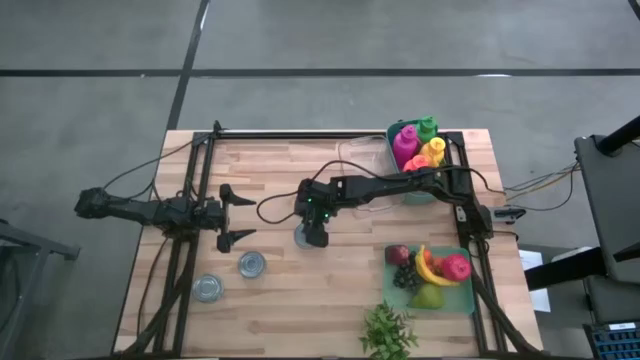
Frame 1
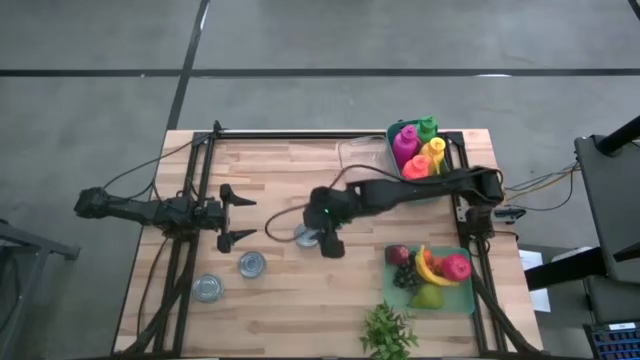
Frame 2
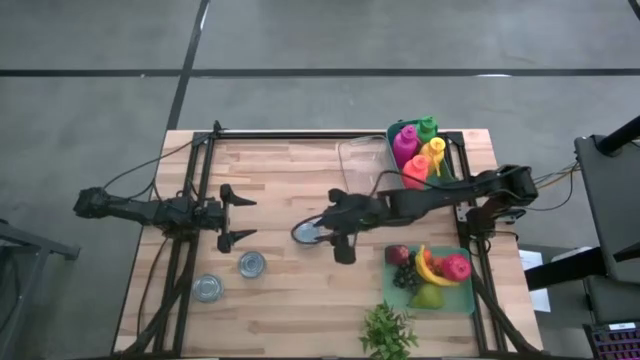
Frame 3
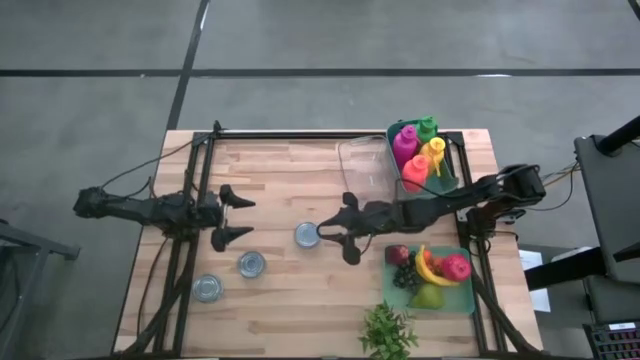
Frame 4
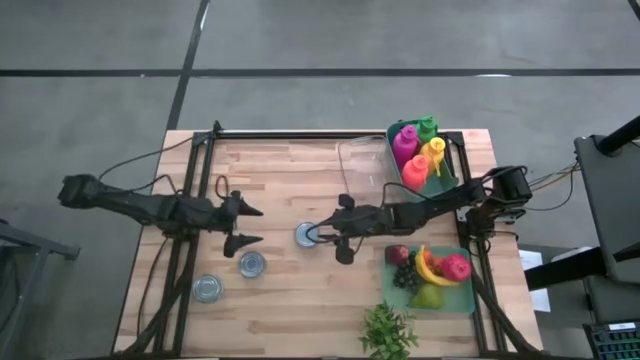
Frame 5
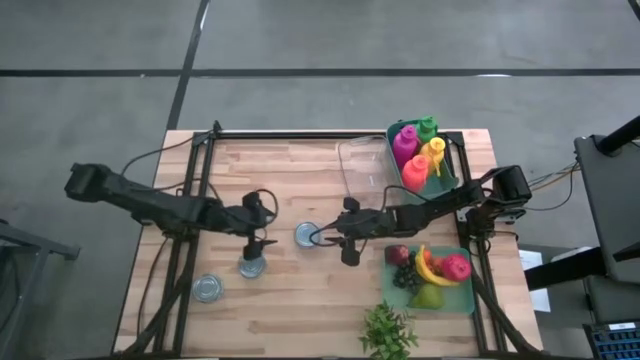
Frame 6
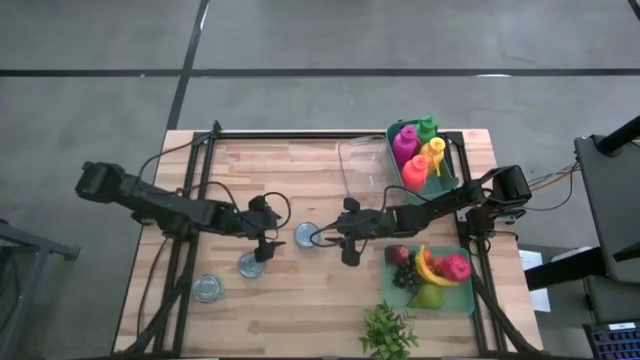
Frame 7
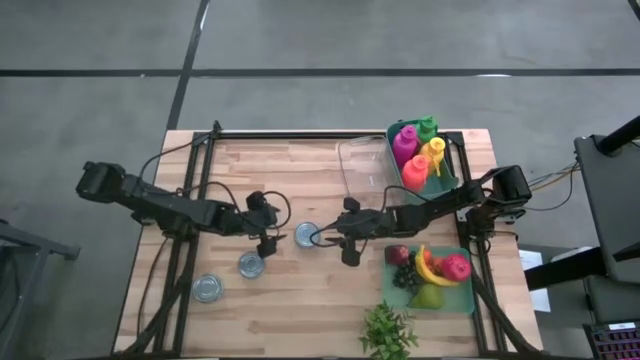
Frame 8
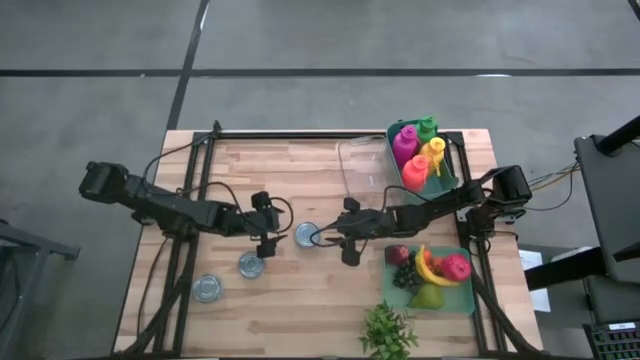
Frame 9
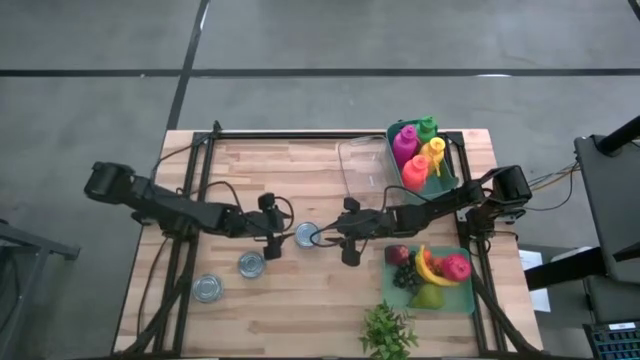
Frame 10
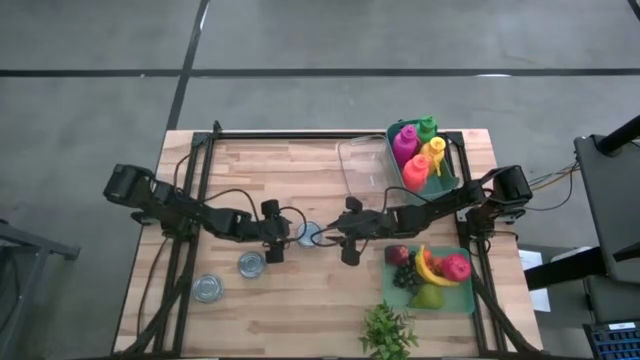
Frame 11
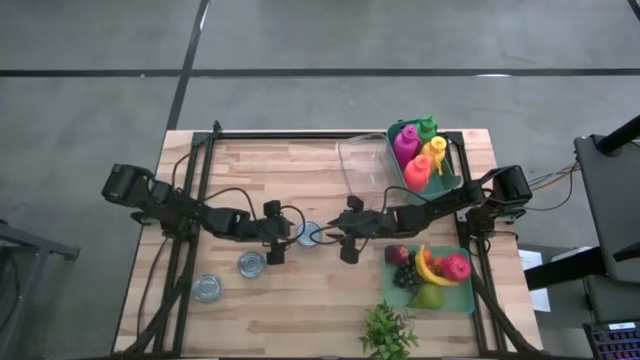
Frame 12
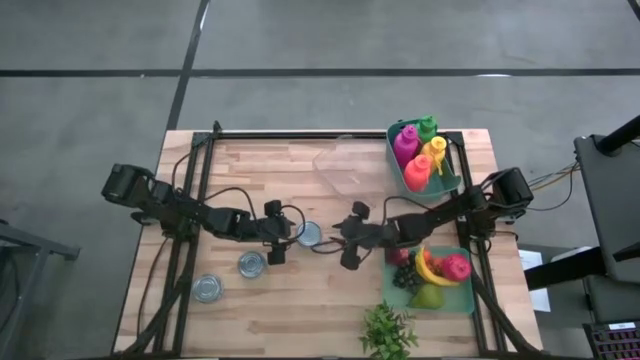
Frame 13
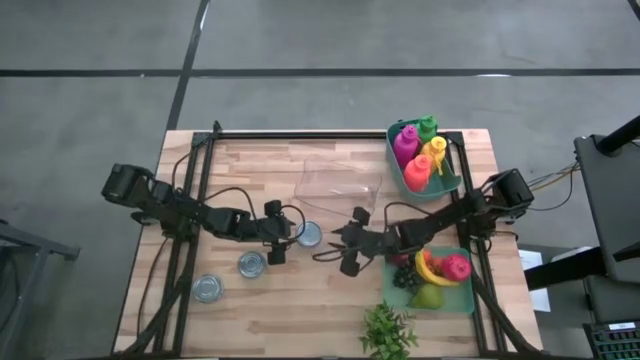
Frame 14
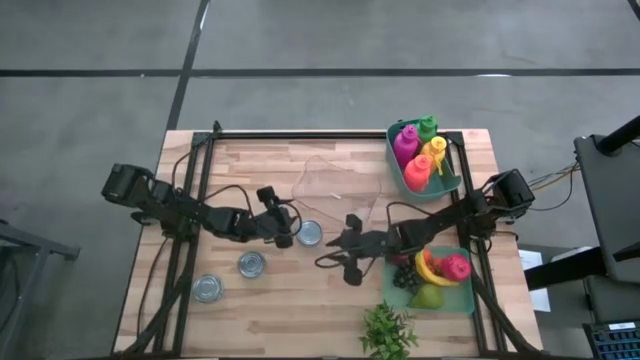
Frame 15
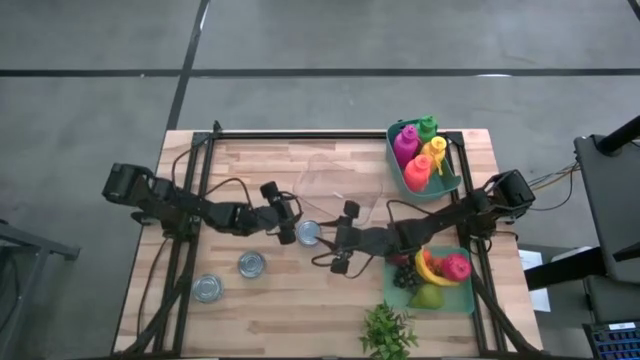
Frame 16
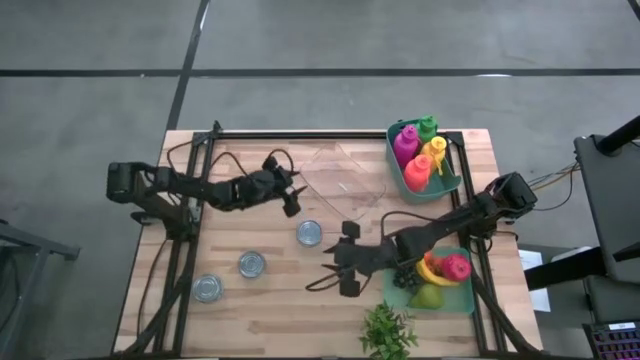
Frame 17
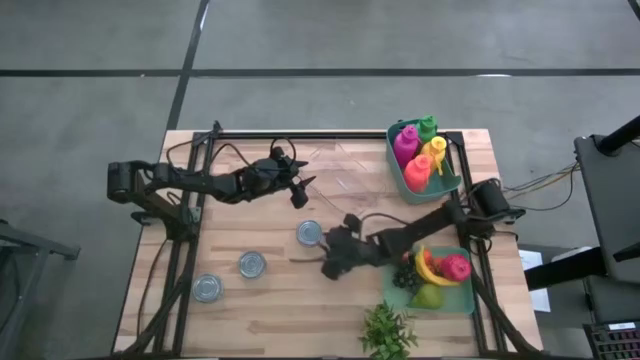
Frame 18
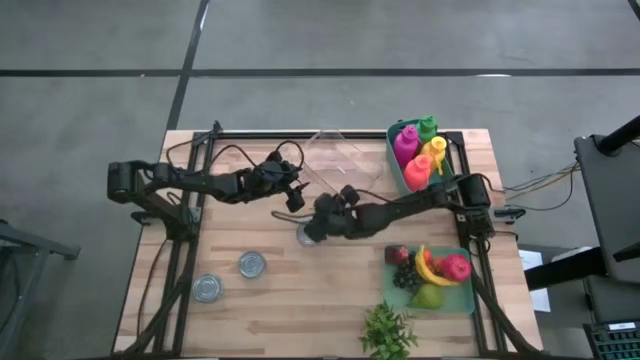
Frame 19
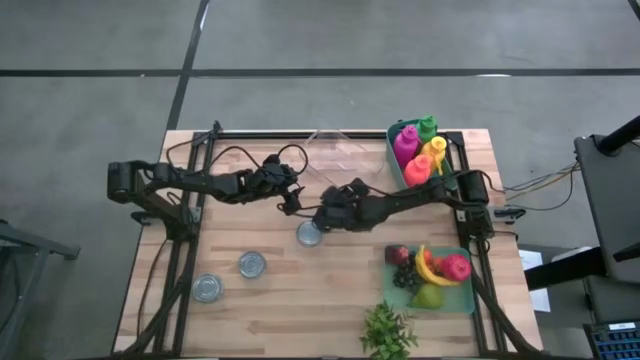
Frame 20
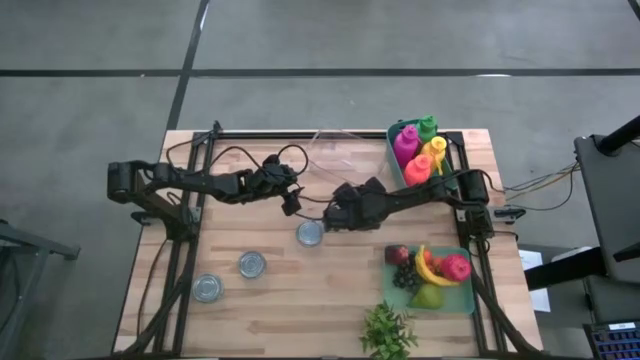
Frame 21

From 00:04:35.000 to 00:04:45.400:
Task: Pick & Place Food Item
Adjust the transparent bin

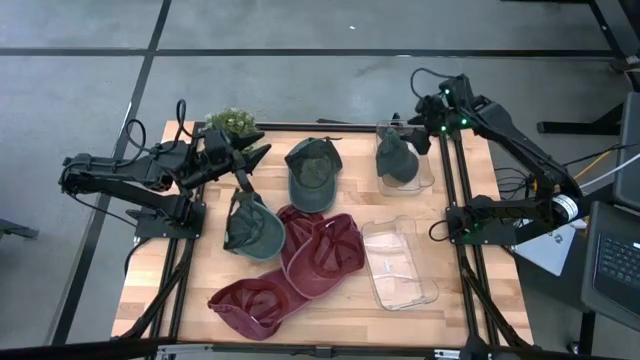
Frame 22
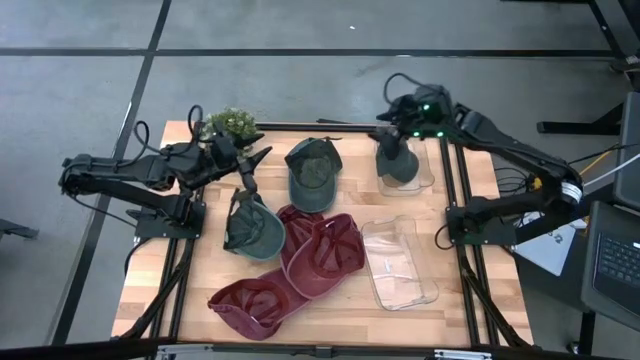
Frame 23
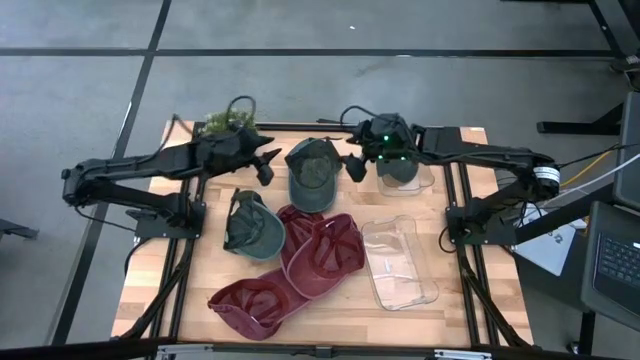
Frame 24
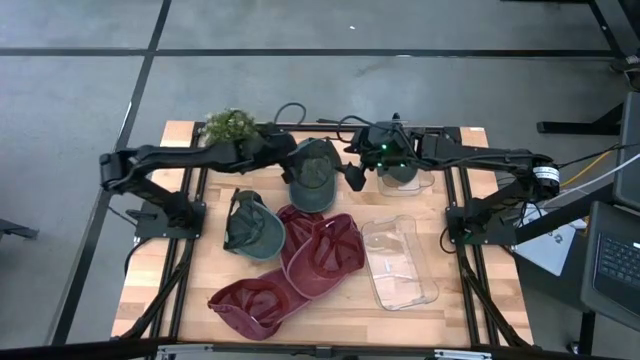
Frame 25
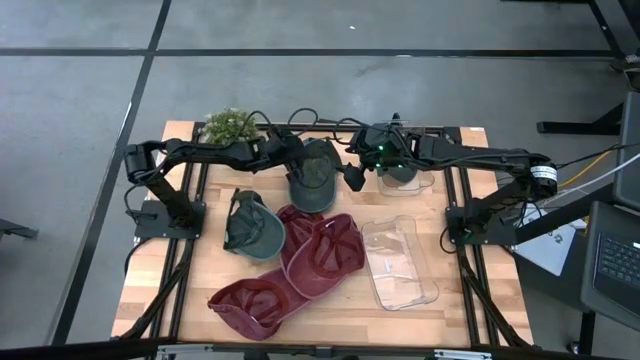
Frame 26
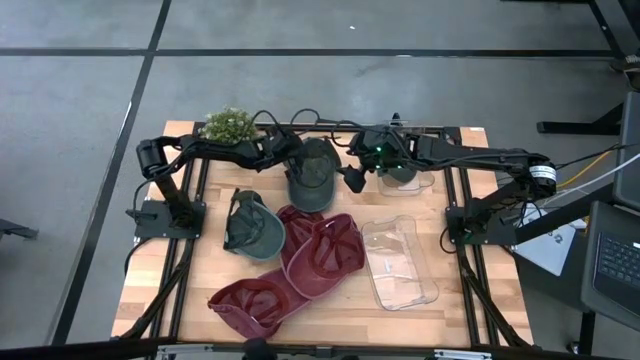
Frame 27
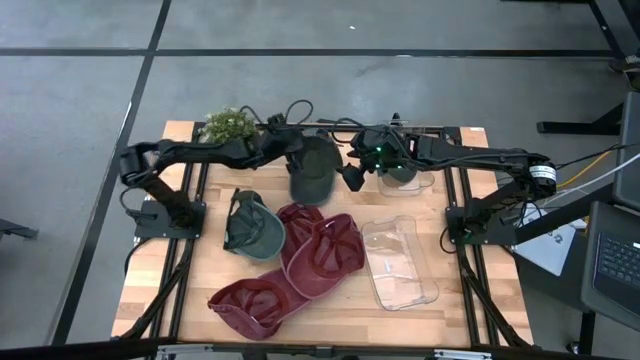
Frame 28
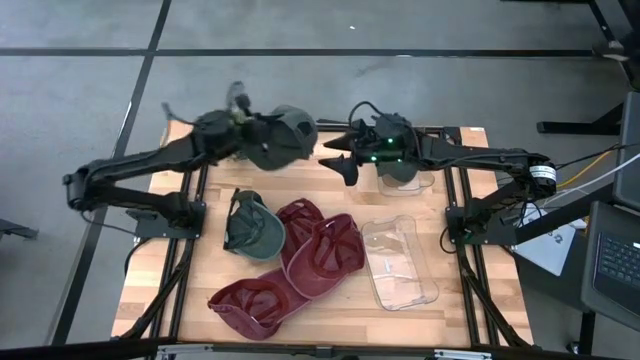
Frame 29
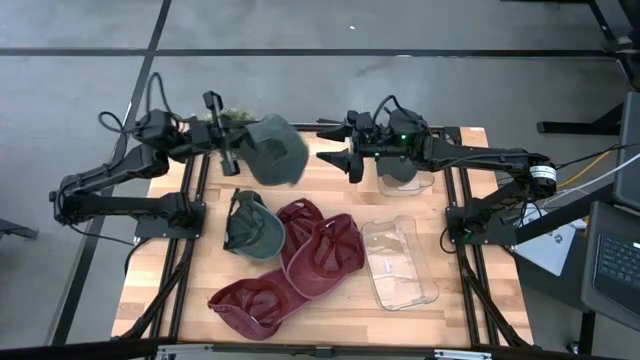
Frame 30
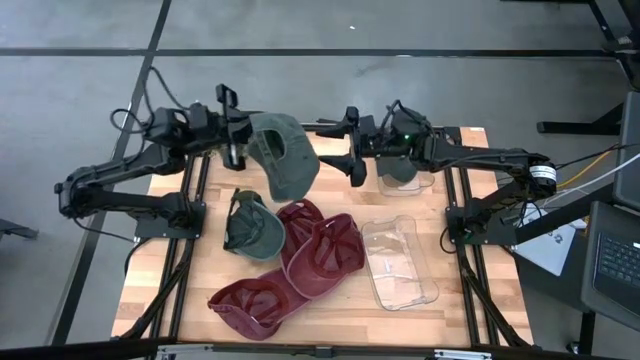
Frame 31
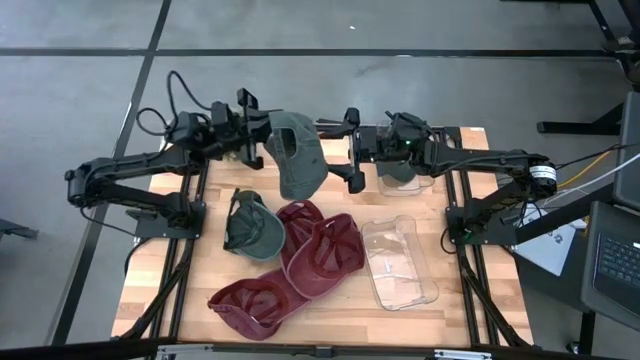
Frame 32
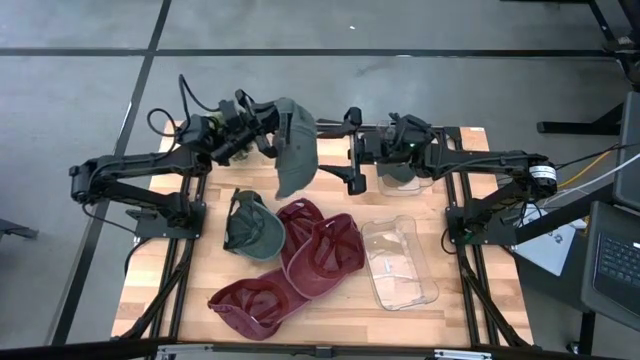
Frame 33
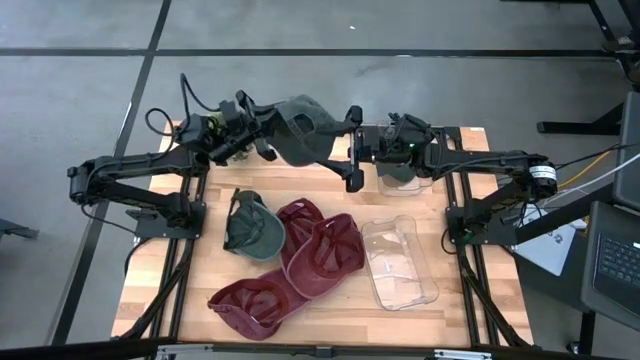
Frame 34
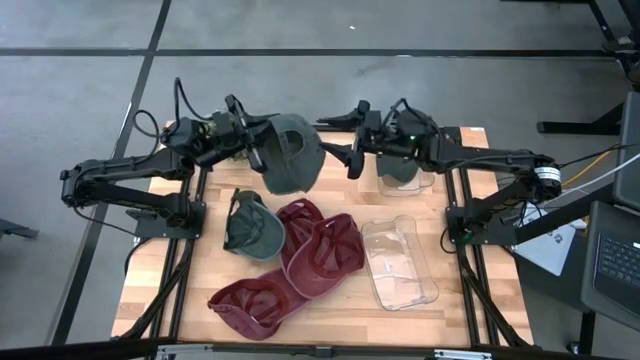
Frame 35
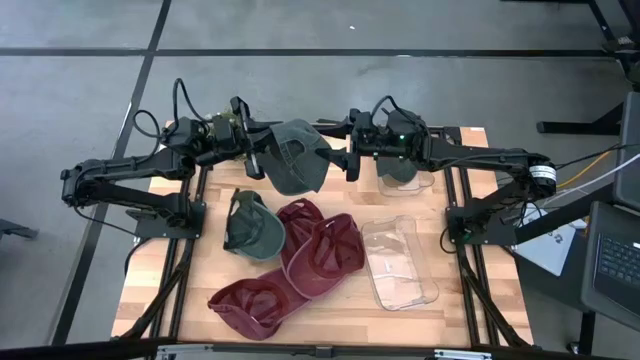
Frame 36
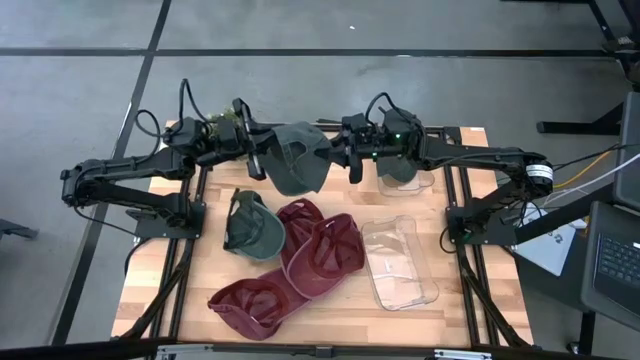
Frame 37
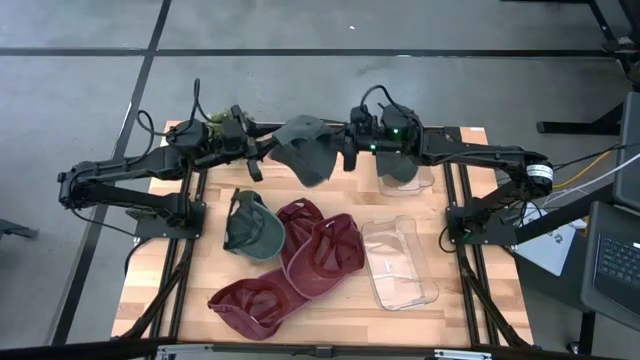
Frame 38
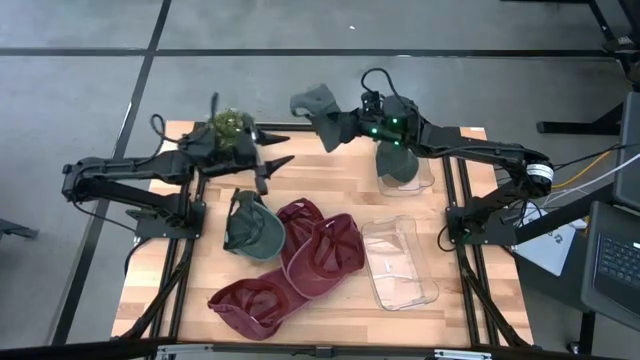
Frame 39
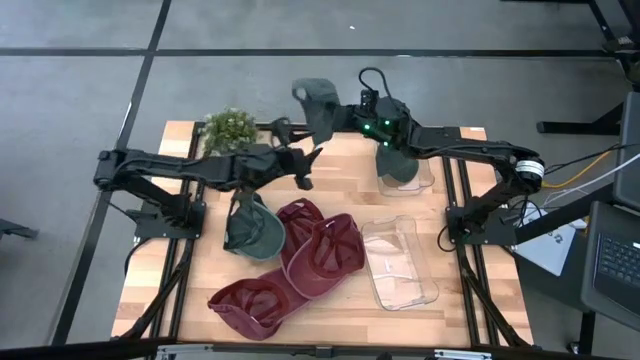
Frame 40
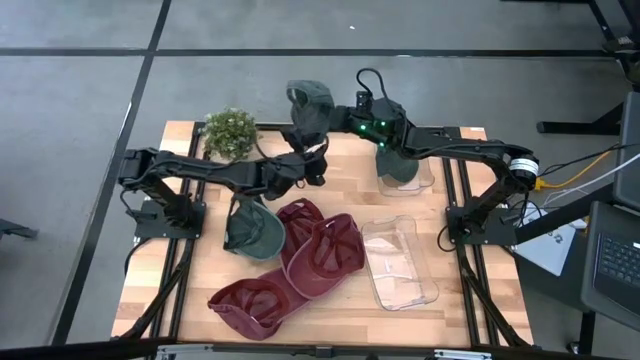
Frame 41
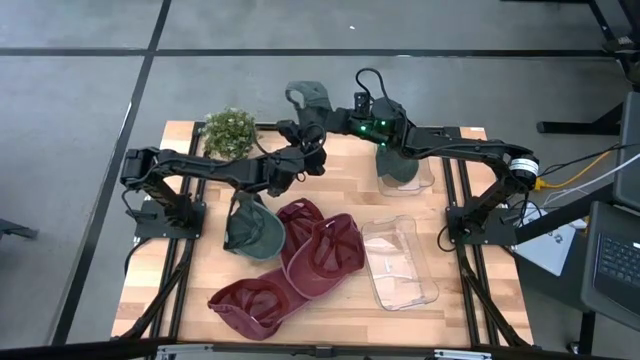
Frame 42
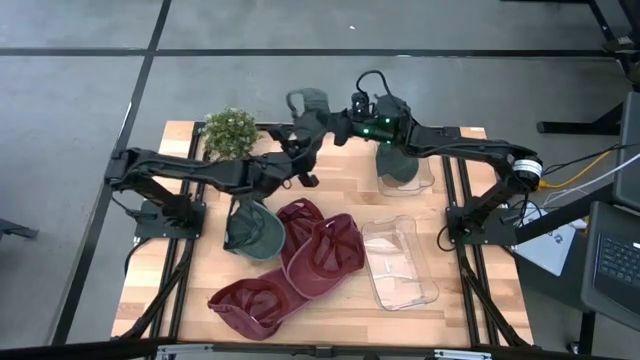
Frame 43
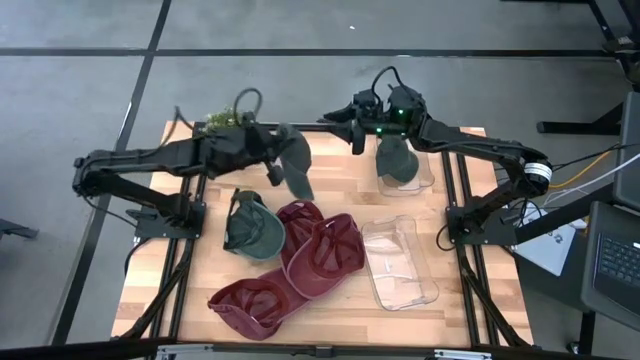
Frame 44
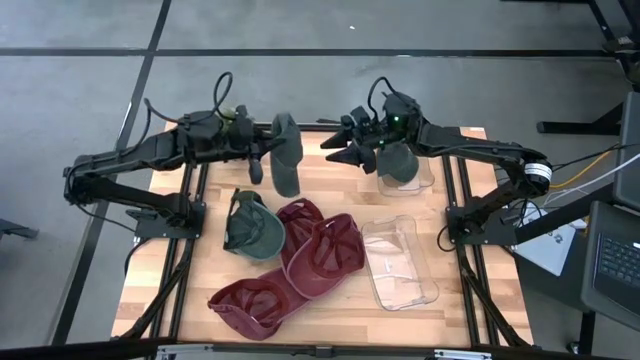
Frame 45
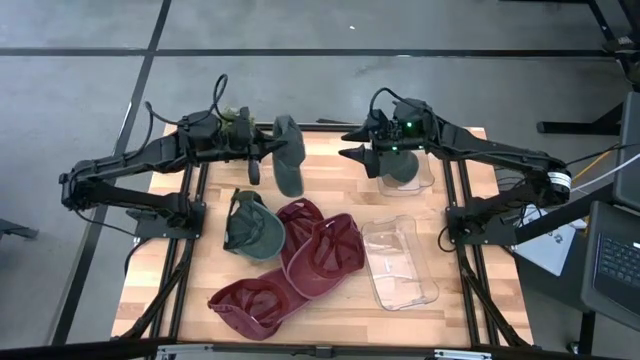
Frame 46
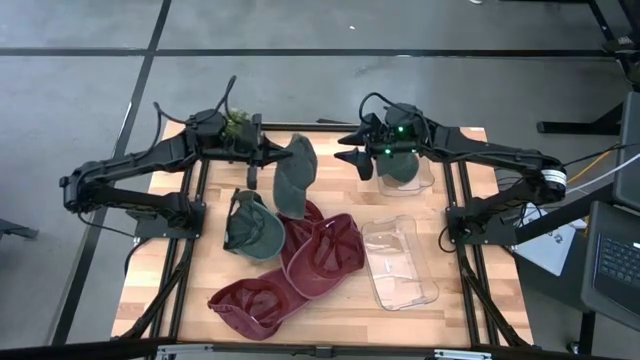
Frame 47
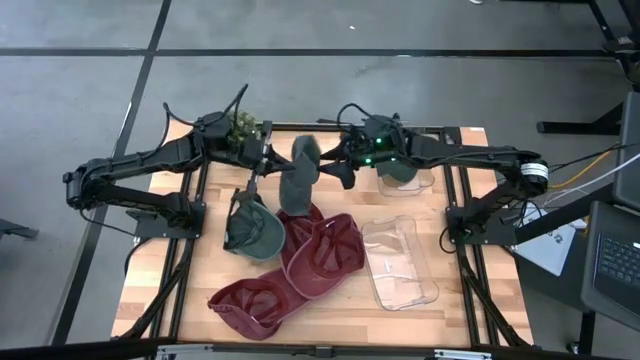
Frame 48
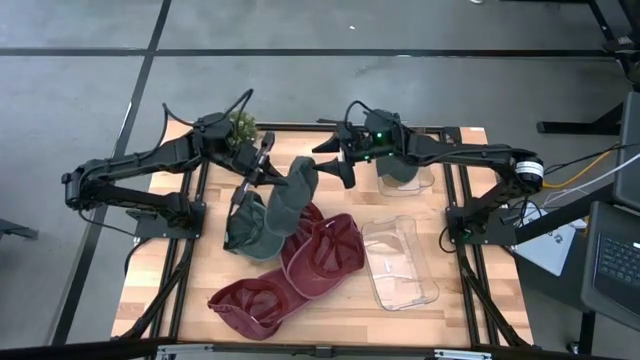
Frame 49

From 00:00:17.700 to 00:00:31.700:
Task: Pick & Place hat
Put the right gray cap into the top transparent bin
